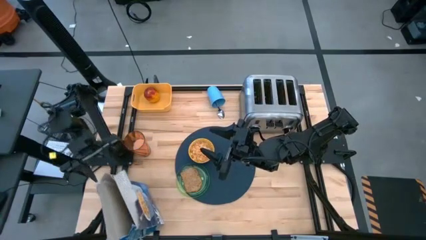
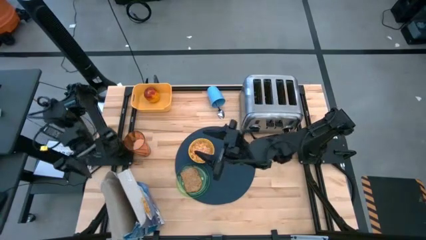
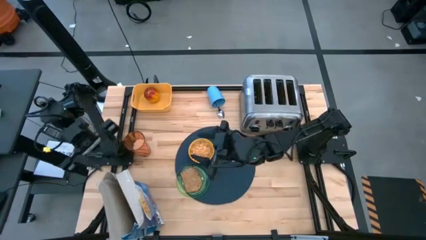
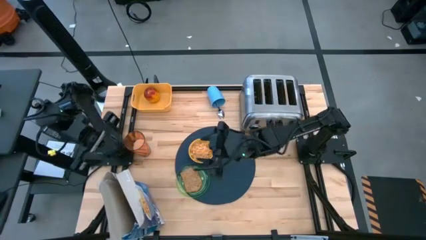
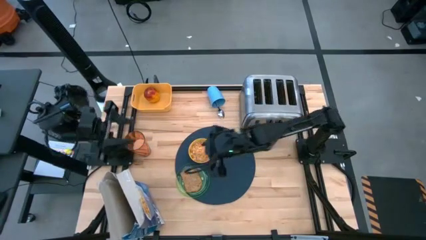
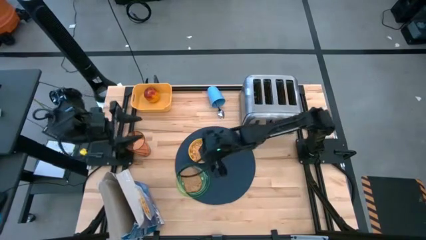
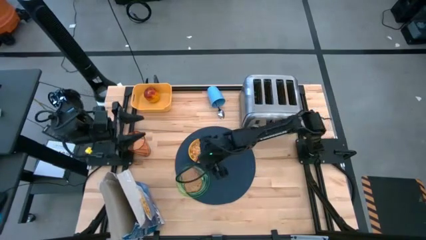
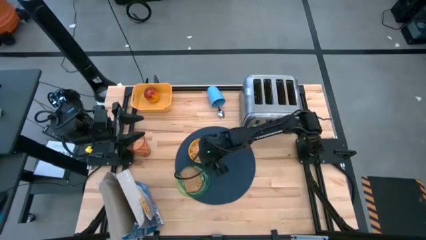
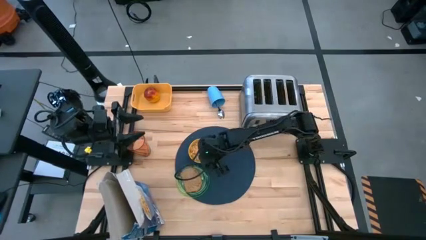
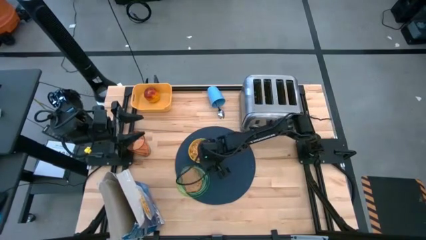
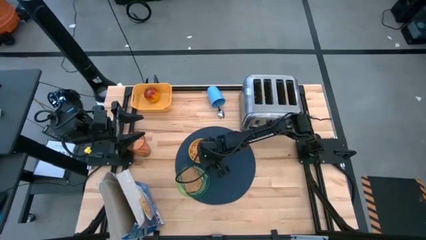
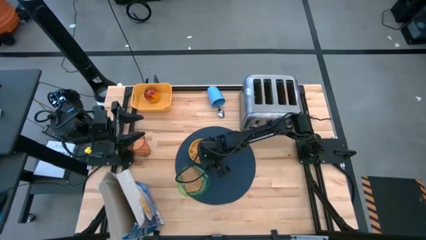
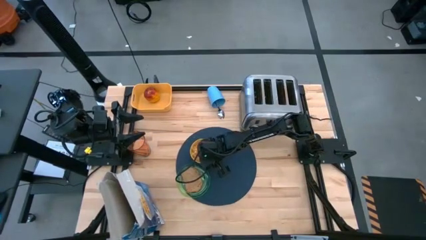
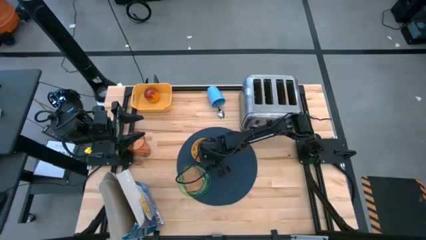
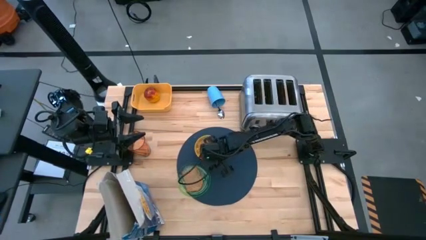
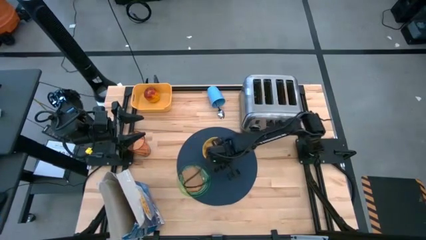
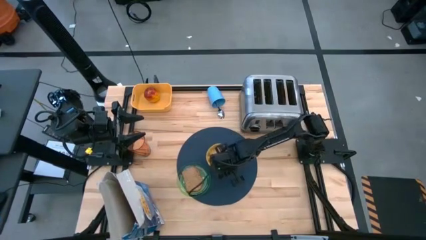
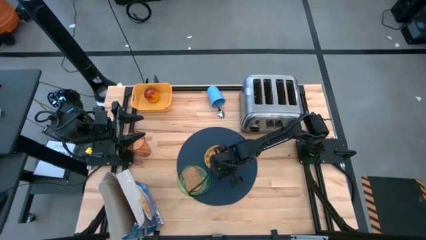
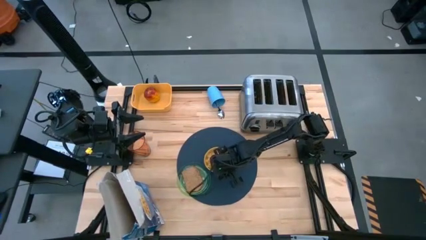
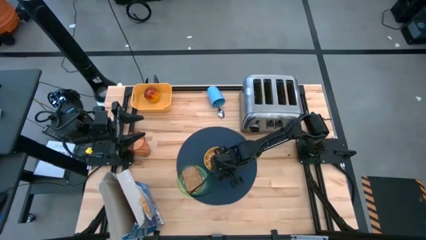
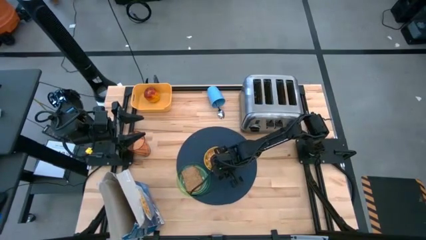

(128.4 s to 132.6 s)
Task: Arrange a breakfast setting
Adjust the yellow bowl on the dark blue table mat

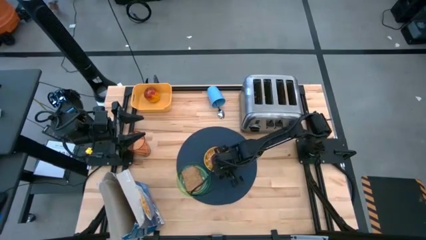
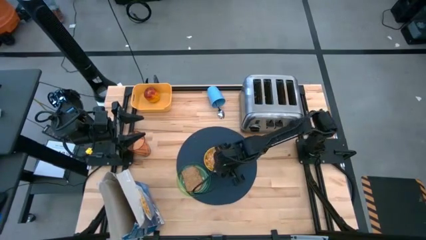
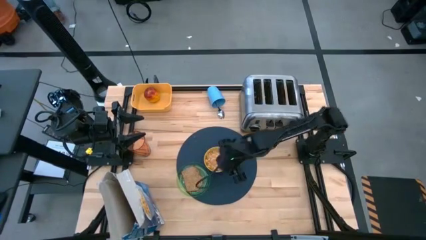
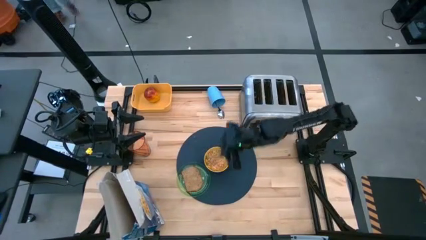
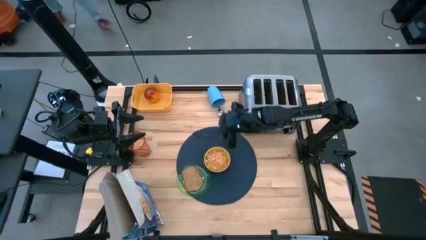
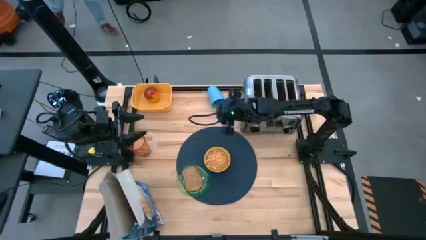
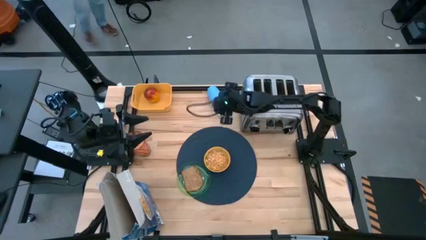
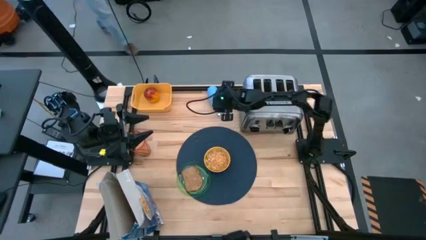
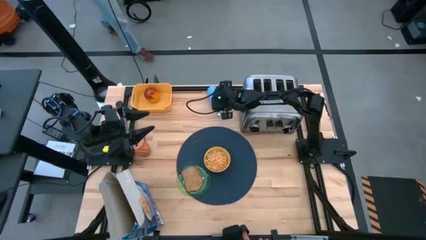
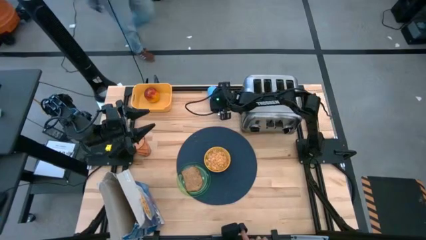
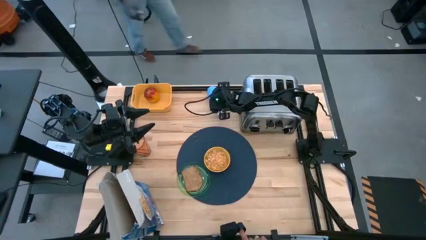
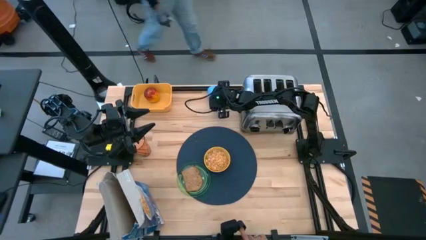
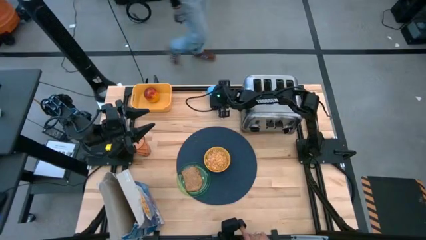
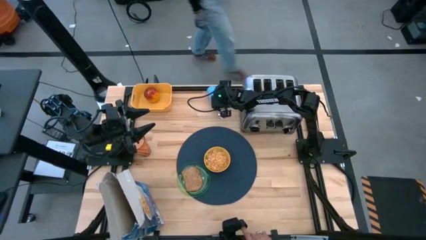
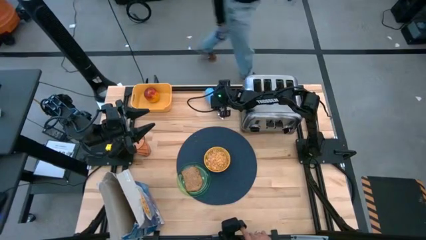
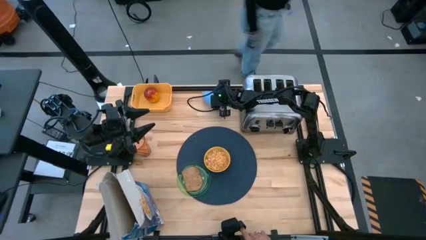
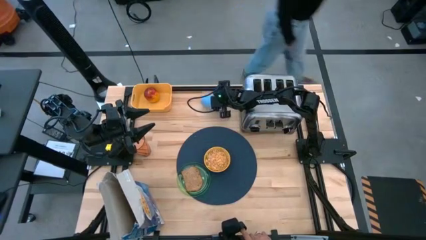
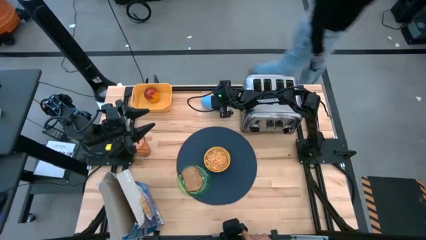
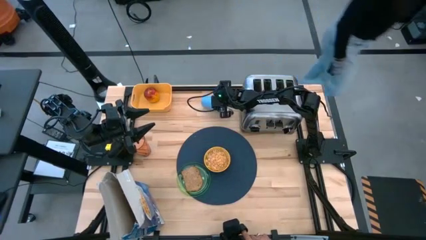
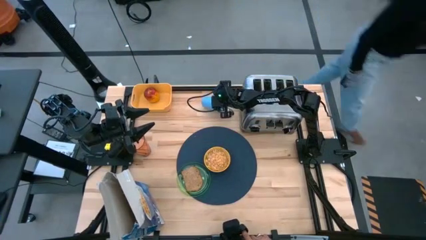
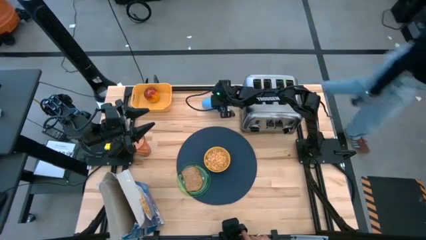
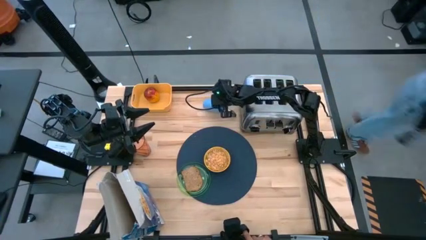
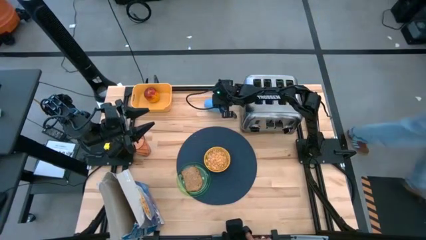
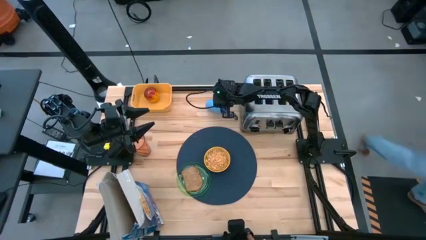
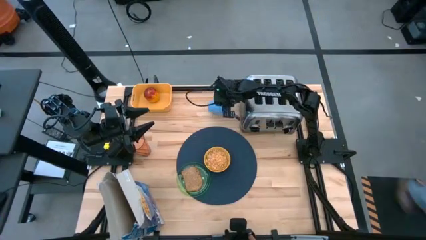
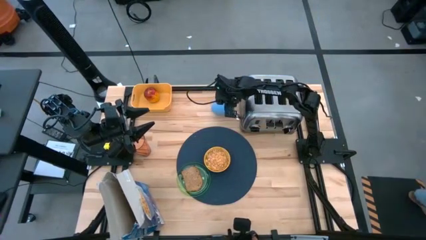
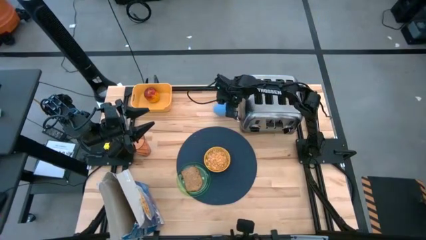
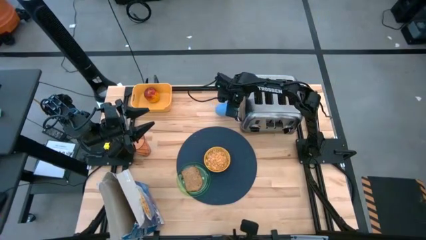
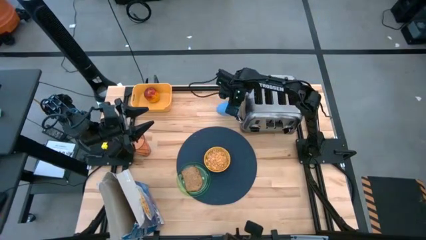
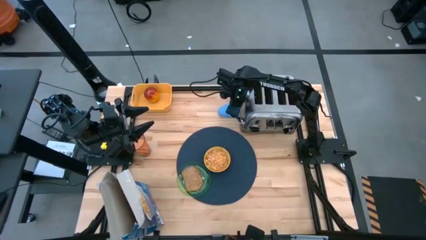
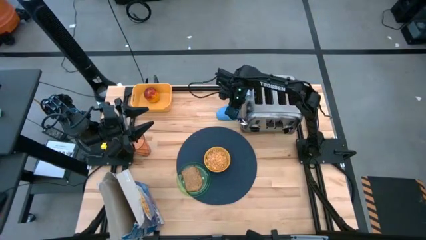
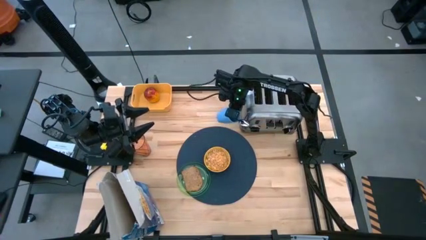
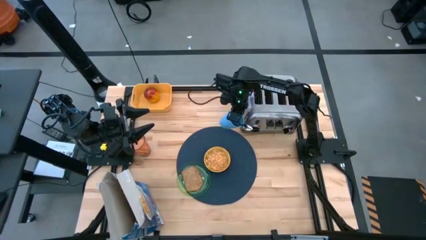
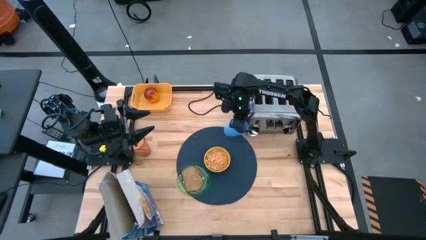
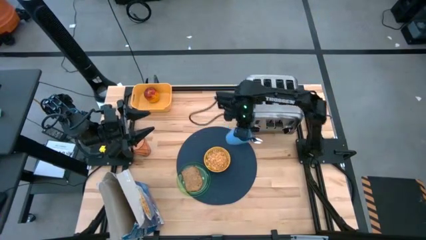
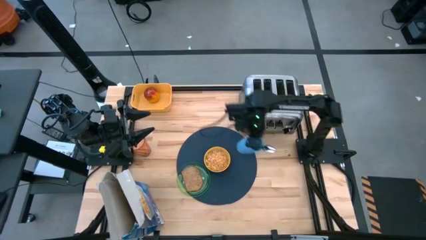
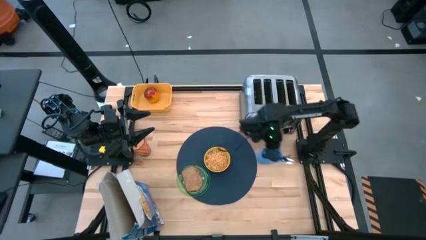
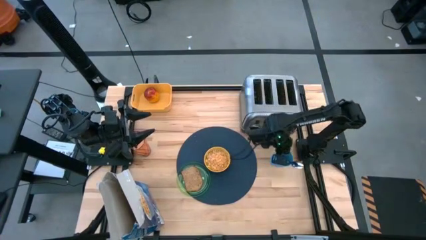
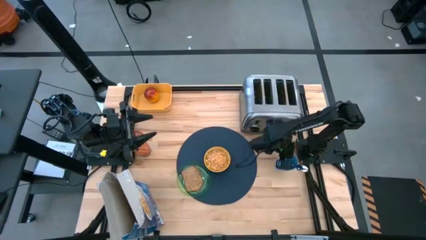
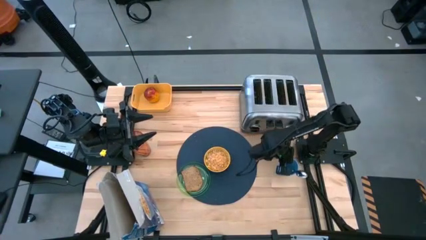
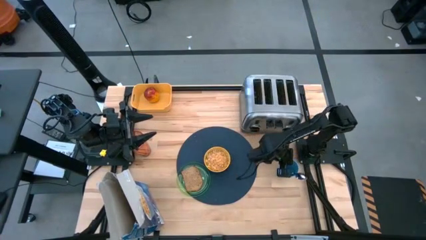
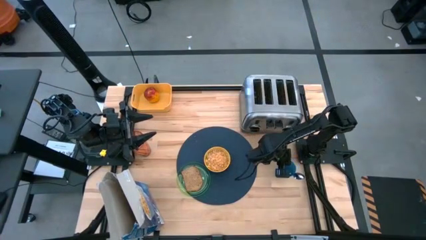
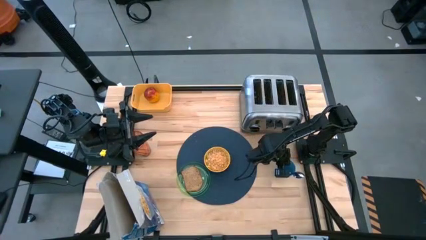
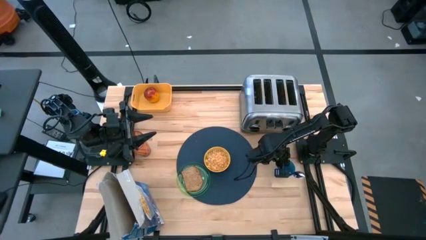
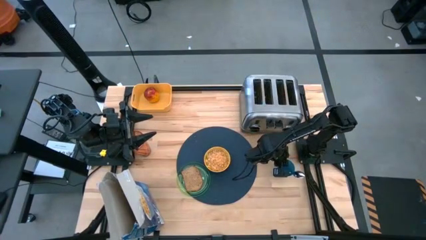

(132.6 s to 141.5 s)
Move the dark blue cup from top middle to middle right table
